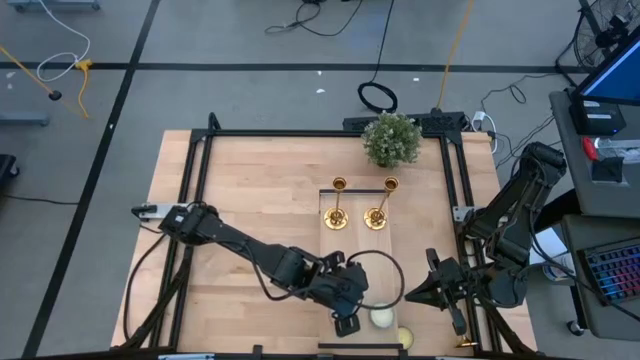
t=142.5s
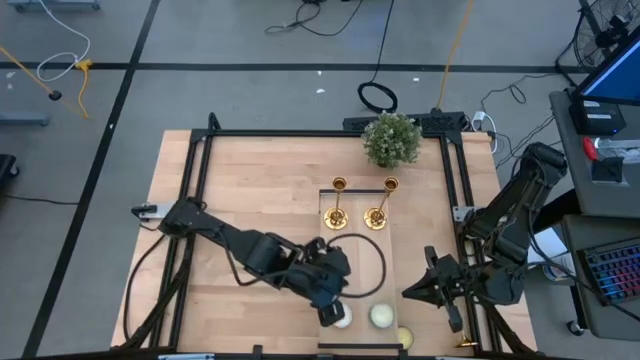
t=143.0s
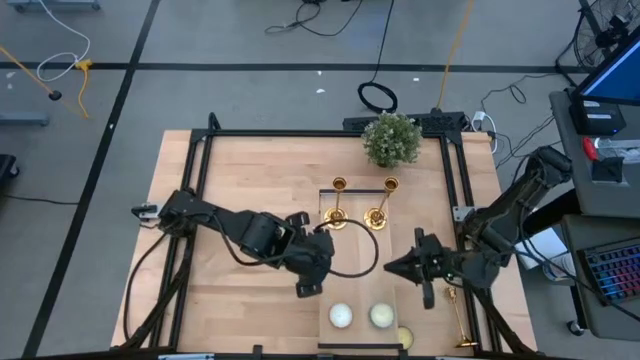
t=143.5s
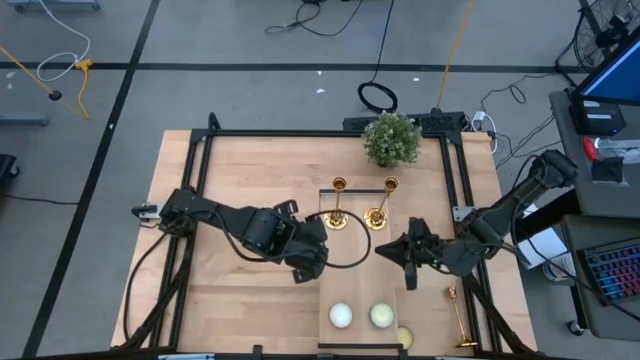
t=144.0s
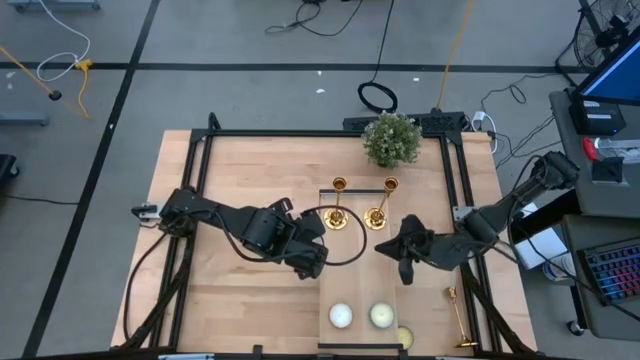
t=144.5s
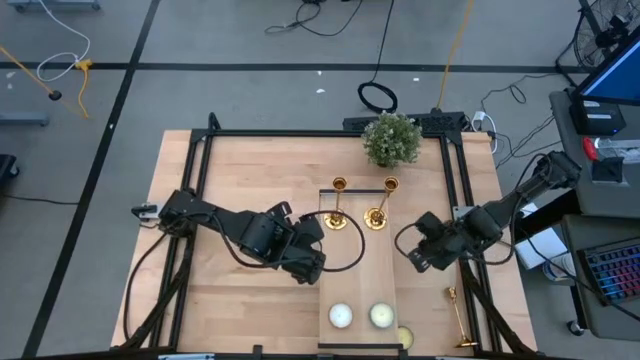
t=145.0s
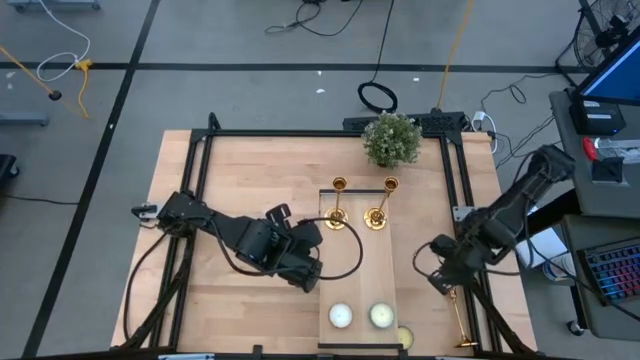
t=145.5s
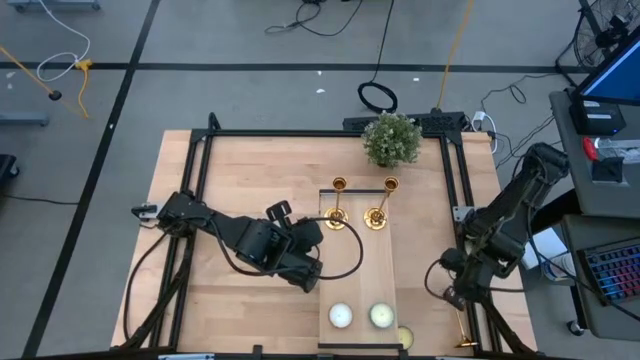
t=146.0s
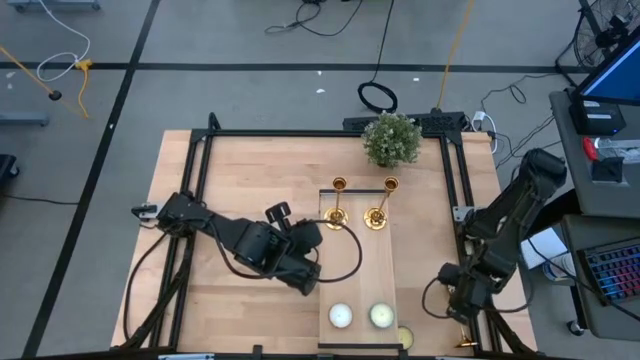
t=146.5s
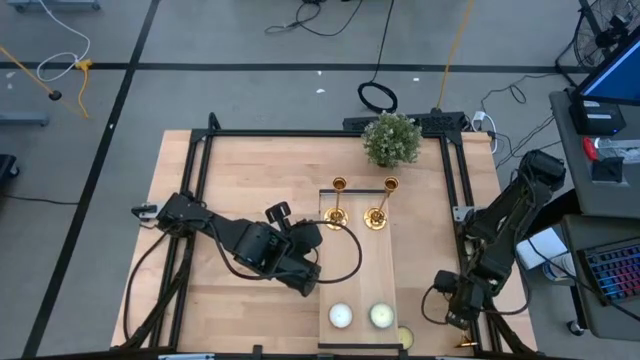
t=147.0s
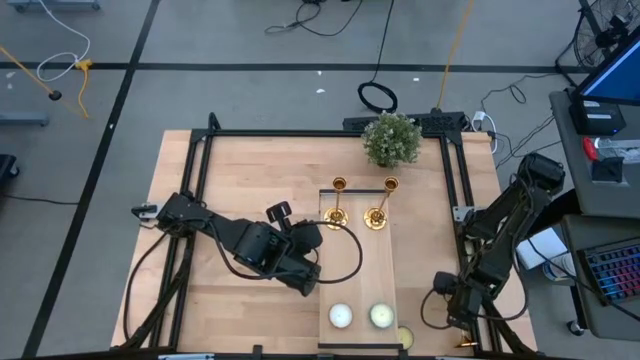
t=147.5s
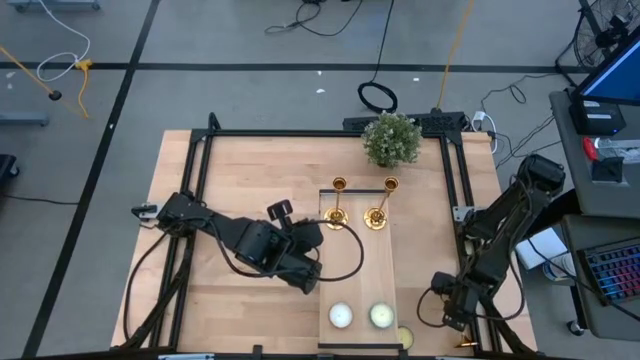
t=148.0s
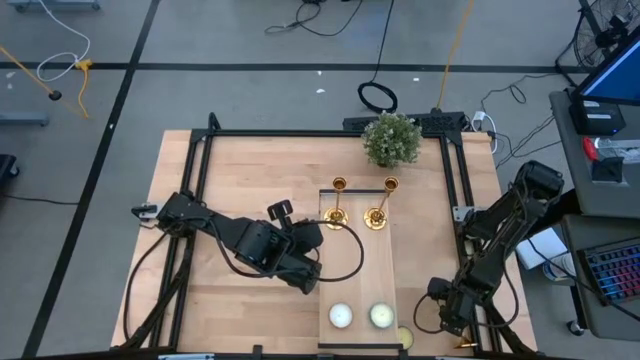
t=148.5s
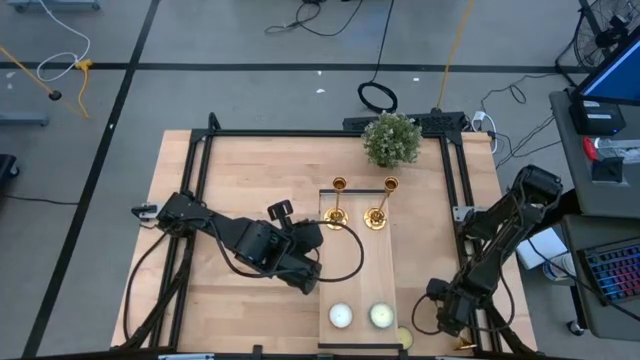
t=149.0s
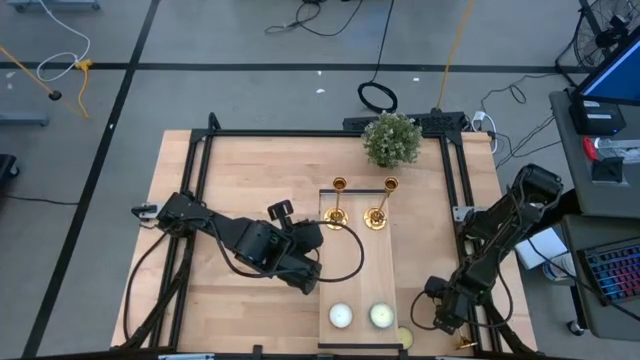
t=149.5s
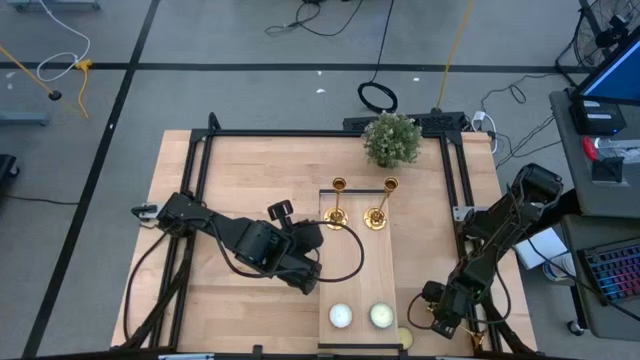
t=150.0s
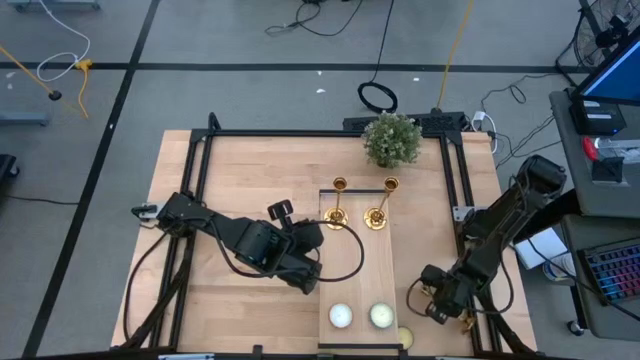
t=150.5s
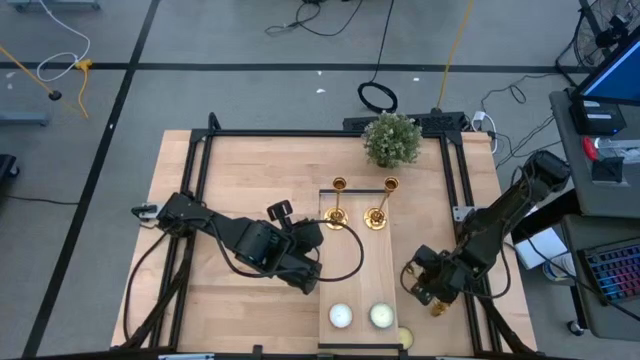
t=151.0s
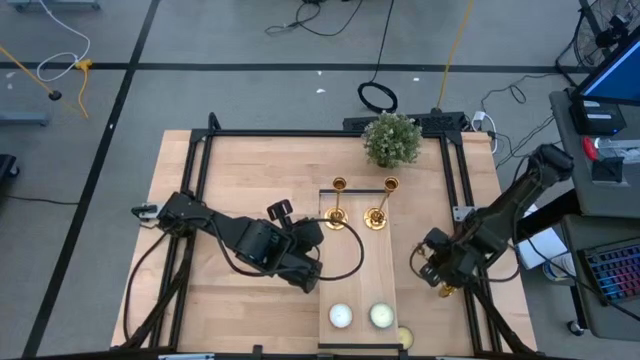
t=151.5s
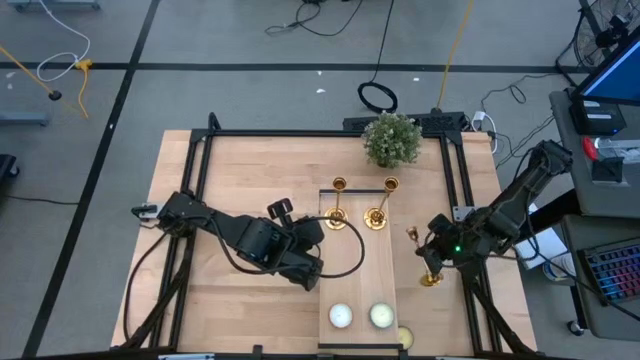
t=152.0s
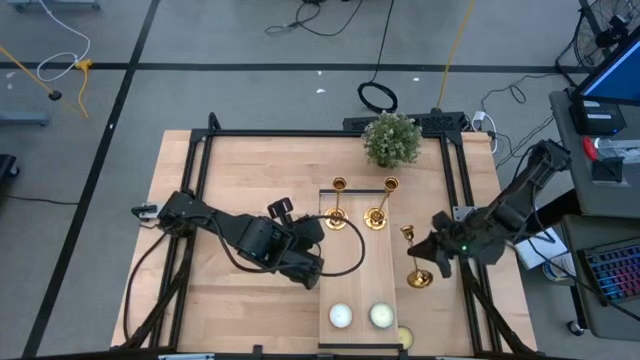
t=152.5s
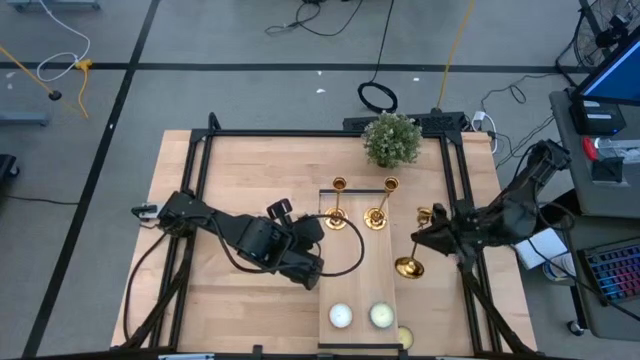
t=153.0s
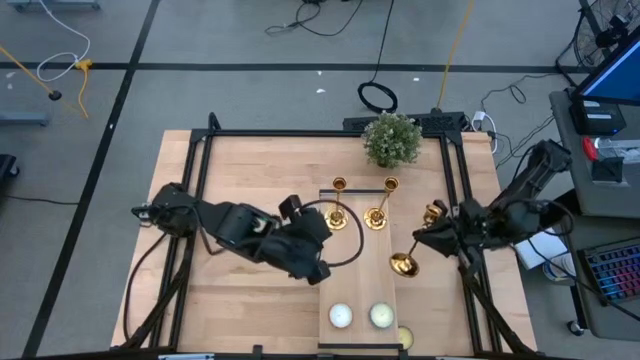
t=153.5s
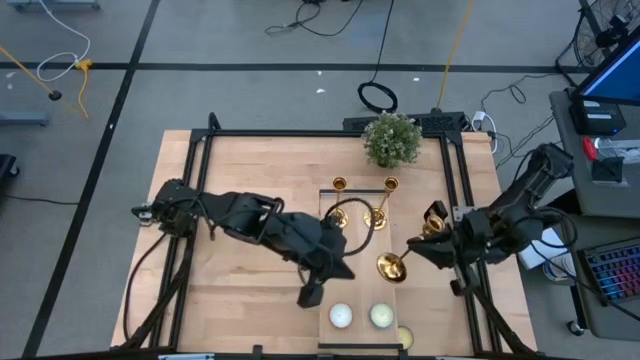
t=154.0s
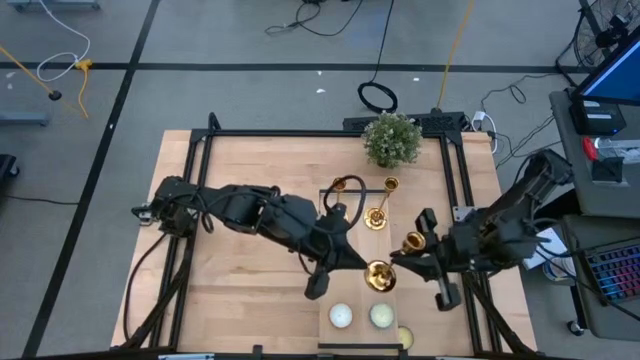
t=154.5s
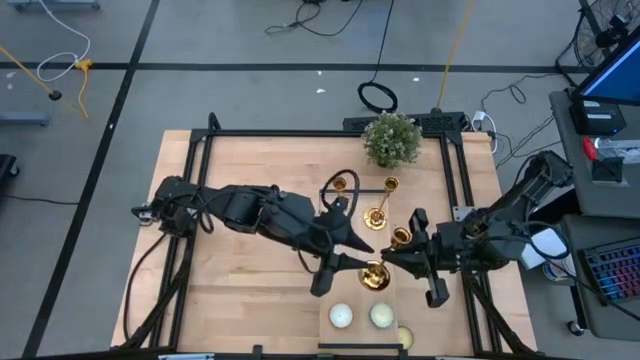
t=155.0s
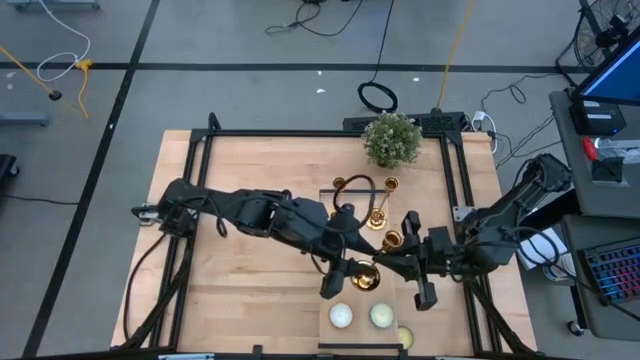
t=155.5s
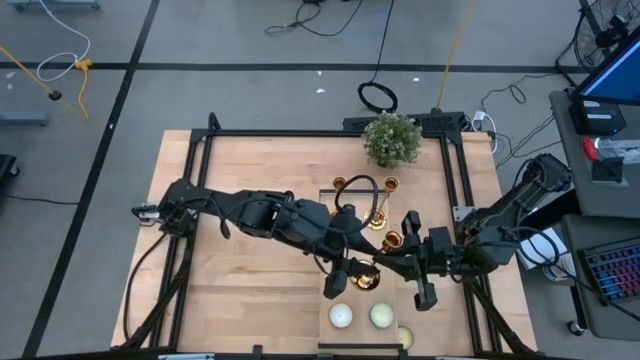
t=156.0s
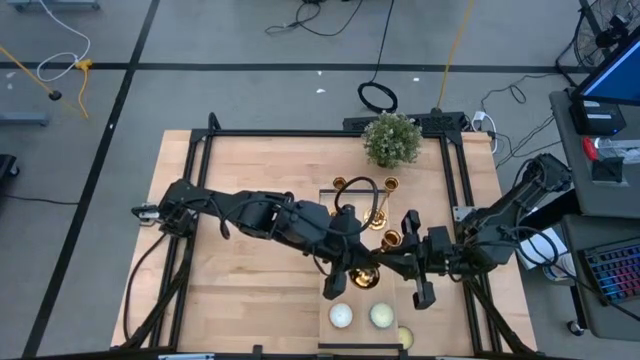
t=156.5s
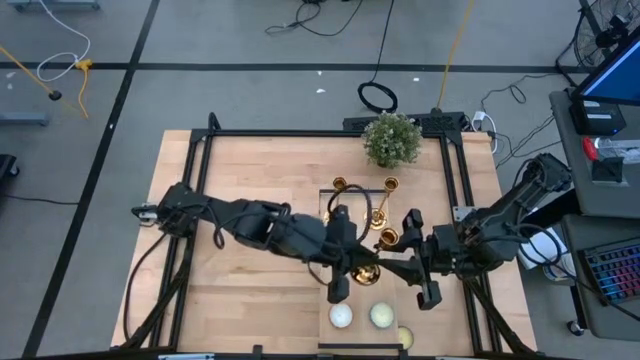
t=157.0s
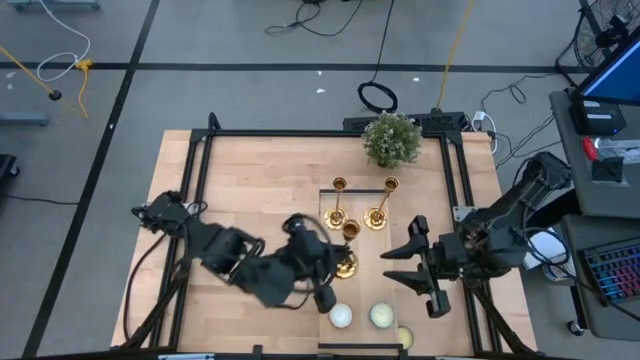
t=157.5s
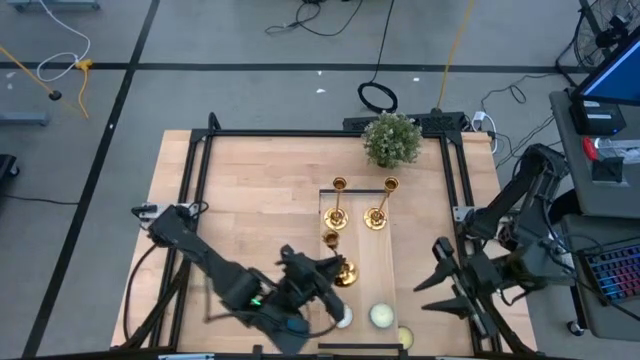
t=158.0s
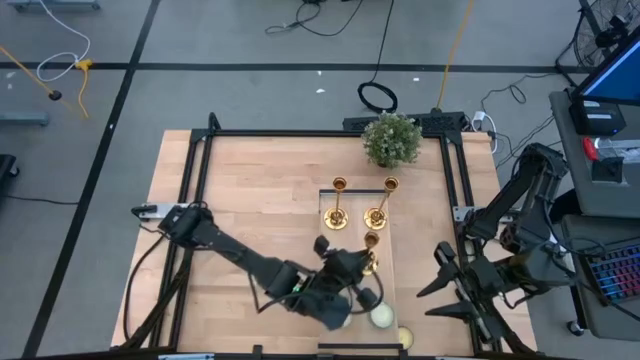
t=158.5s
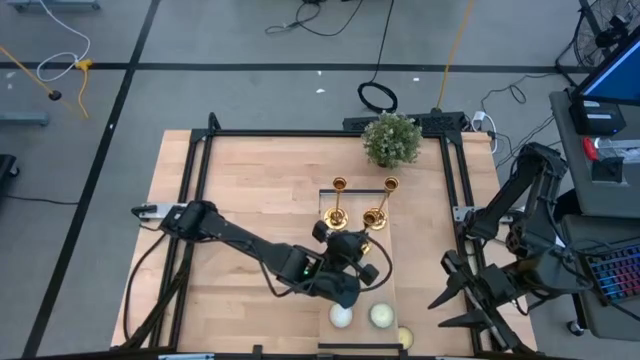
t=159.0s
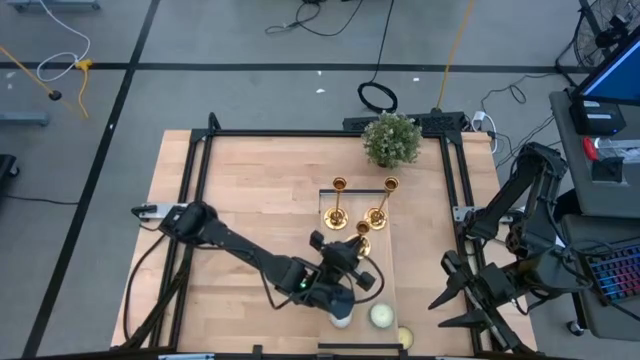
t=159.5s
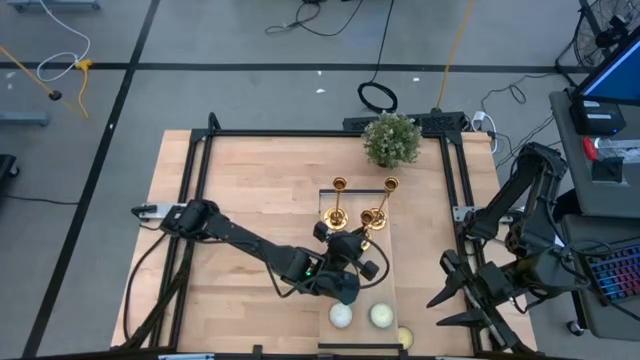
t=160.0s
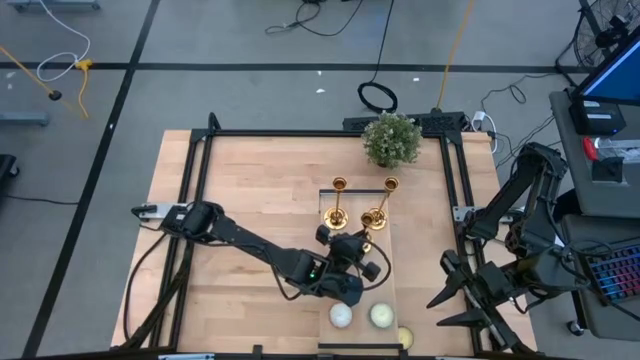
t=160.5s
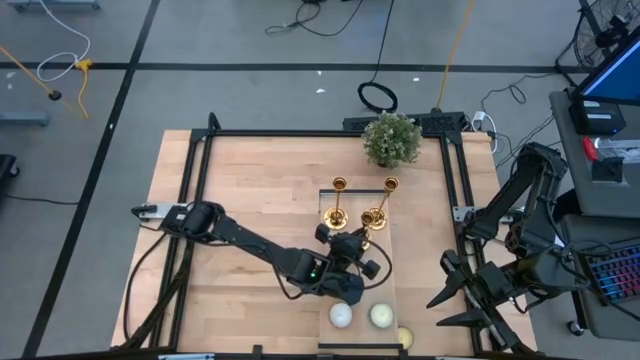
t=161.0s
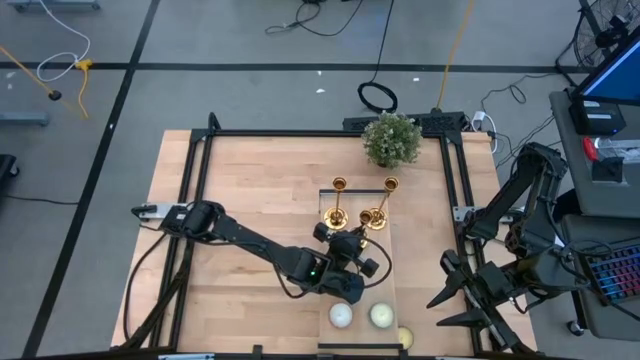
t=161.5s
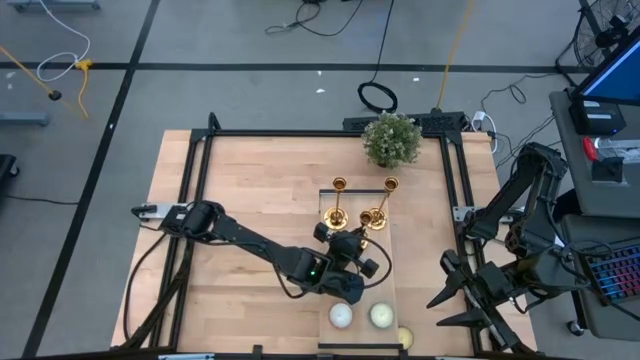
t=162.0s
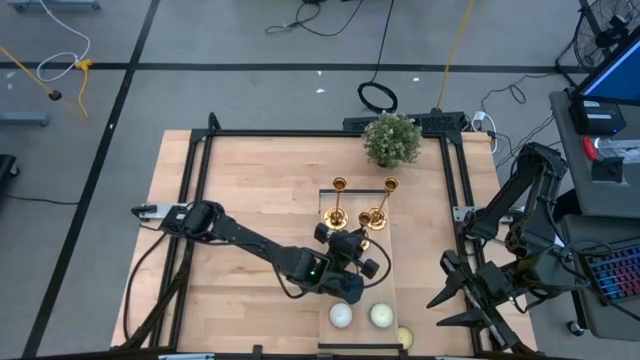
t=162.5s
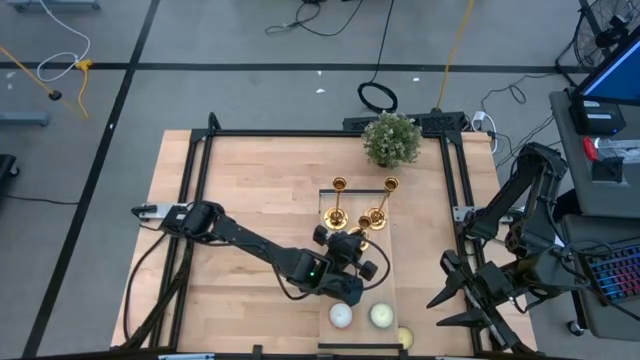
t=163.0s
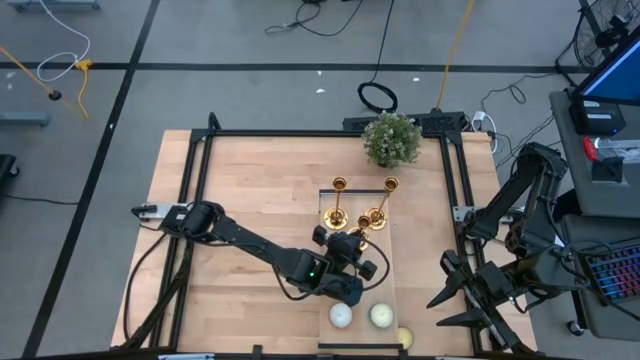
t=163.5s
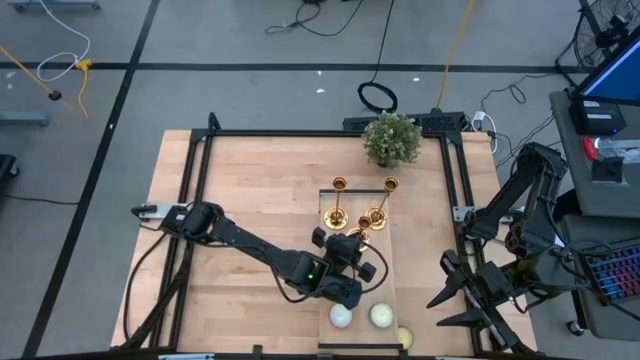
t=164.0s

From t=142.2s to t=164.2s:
Task: Pick & Place candle stick holders
Put the gold candle holder on the shelf
